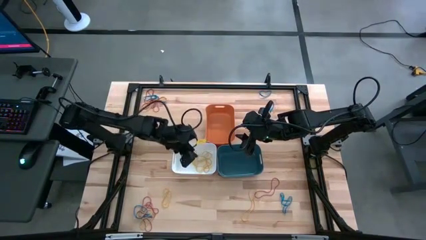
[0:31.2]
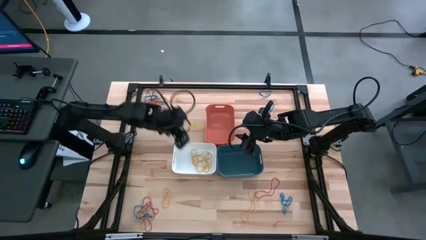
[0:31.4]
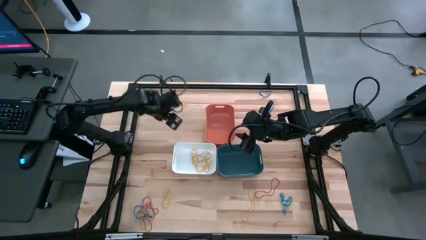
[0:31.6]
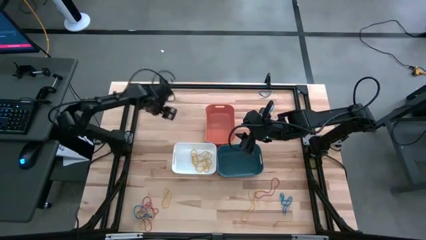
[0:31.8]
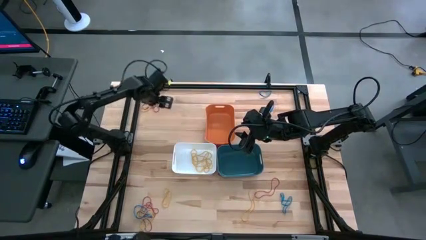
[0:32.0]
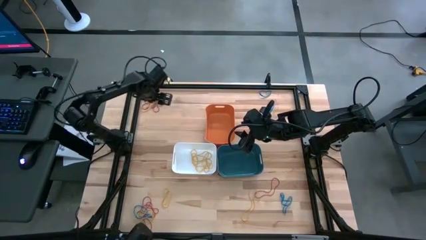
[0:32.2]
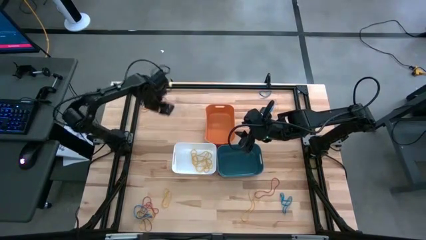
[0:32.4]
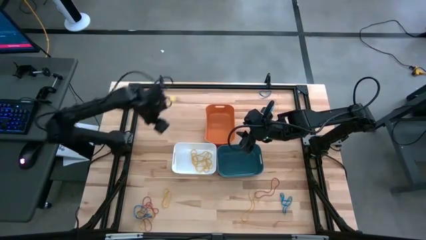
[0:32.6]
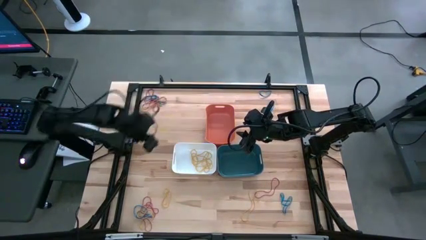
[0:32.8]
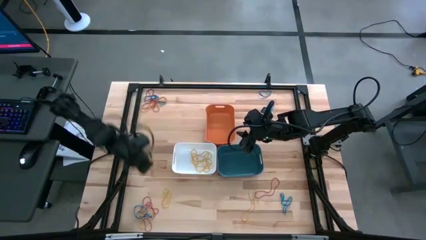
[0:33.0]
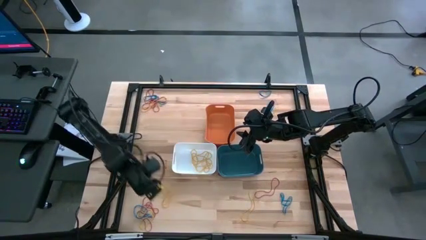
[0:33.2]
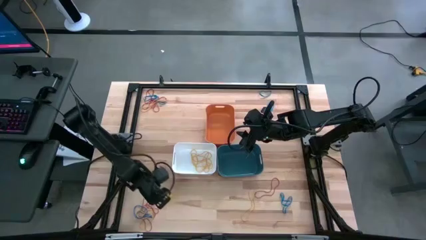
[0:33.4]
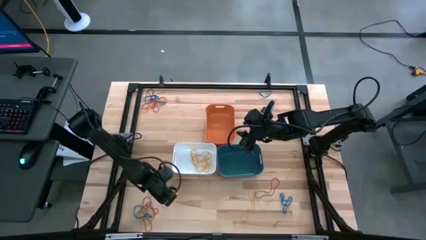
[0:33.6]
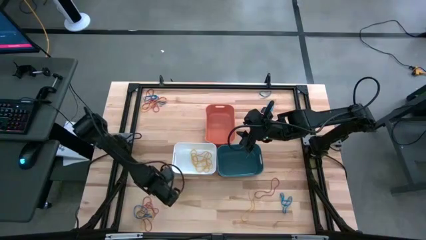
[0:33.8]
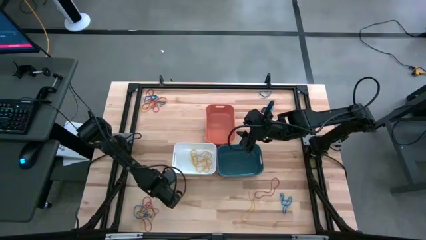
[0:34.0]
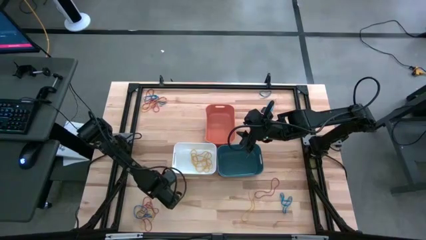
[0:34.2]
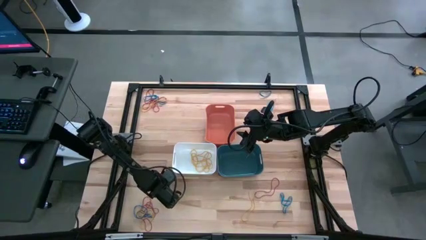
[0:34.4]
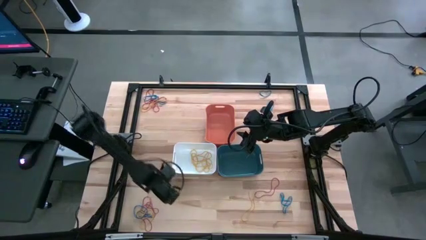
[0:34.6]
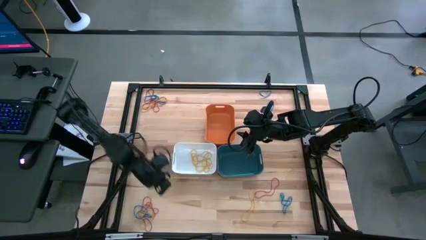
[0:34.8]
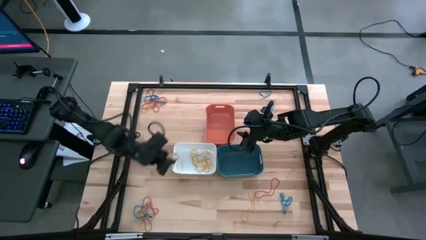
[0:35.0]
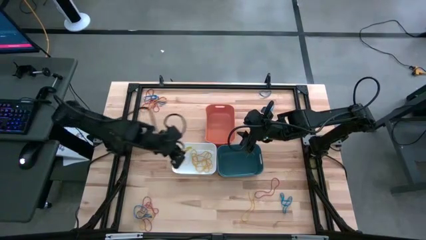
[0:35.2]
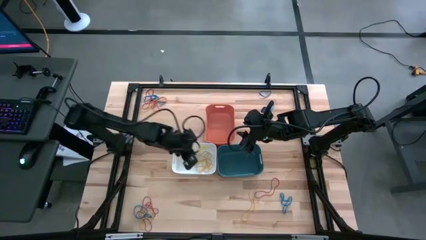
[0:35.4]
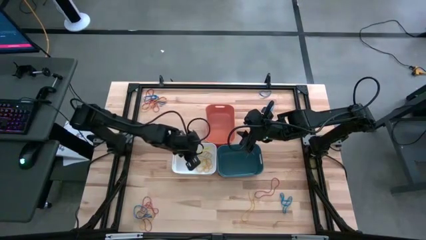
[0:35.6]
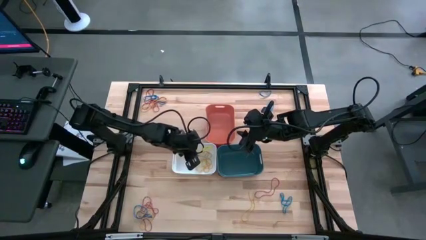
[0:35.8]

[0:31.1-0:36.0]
Task: Sort rubber bands into baskets
Put the yellow rubber band into the white bin

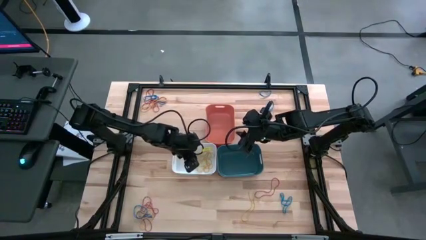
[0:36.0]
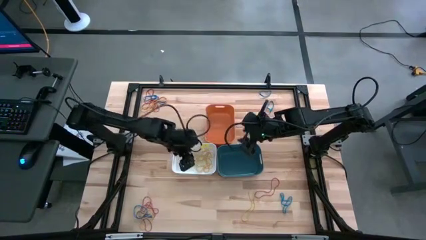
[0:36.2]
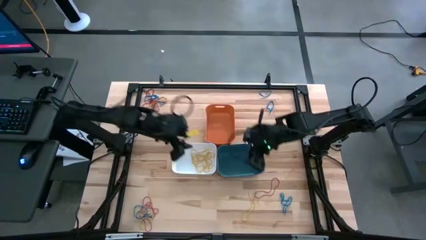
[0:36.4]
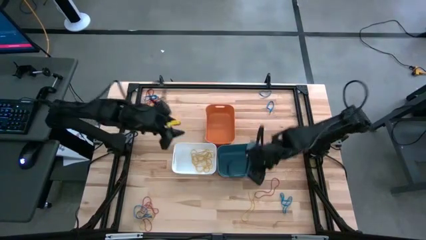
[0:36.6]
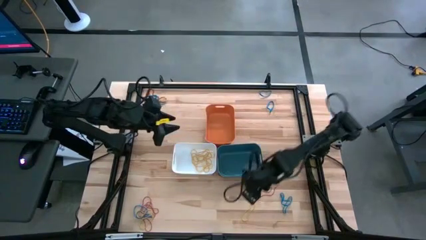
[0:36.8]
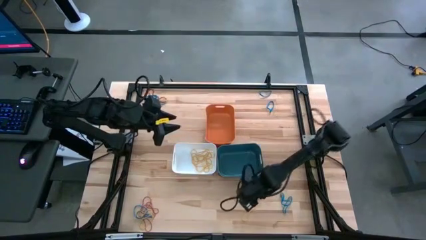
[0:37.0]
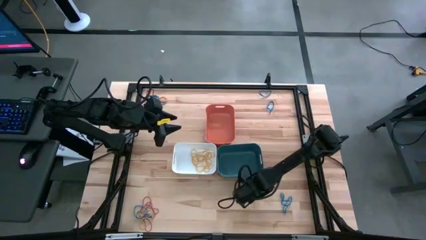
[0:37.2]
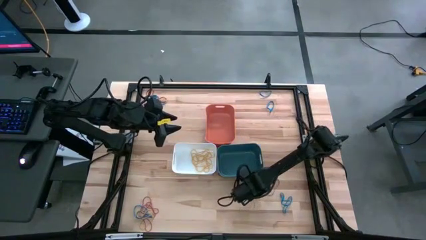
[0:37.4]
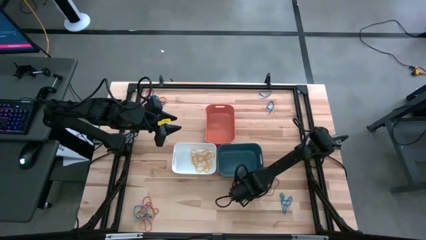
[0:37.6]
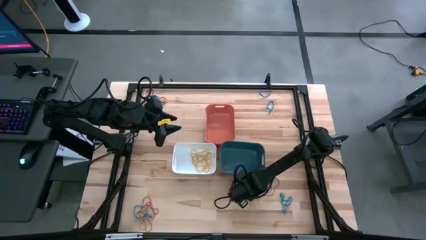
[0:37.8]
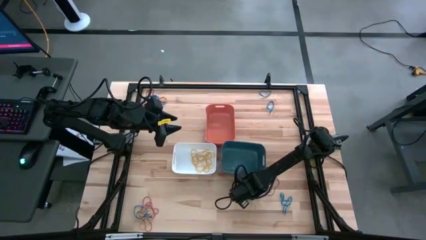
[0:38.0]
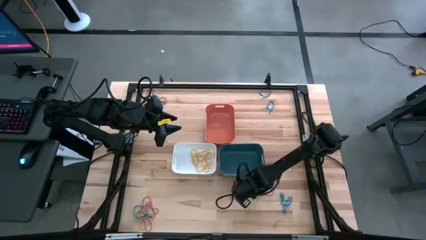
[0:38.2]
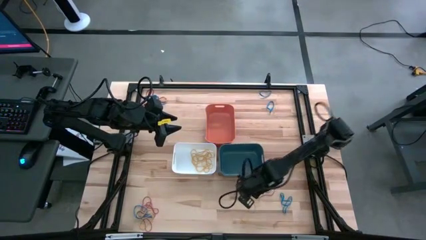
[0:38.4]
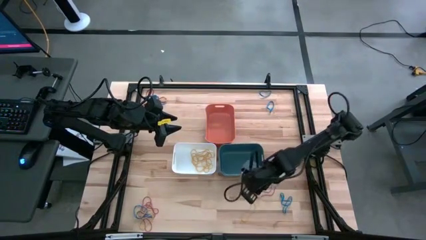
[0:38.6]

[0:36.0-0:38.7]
Put the yellow rubber band into the white bin

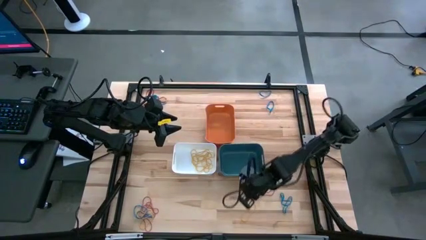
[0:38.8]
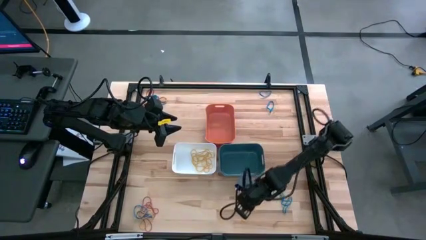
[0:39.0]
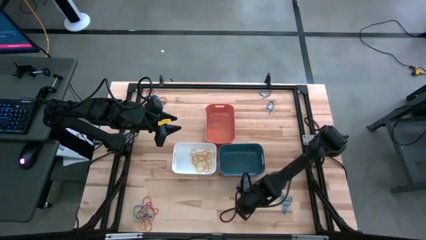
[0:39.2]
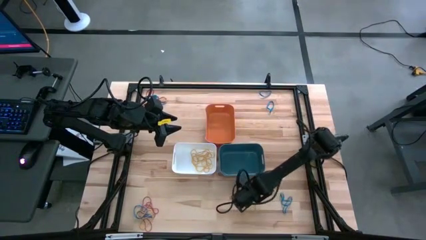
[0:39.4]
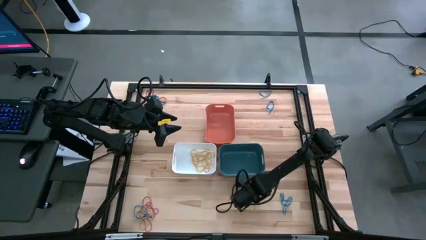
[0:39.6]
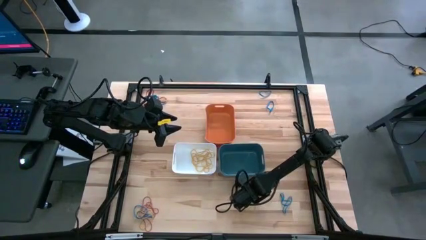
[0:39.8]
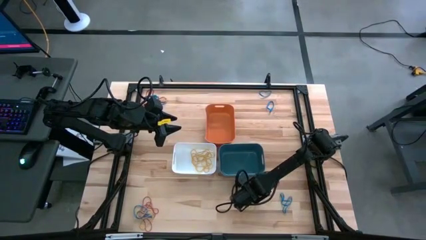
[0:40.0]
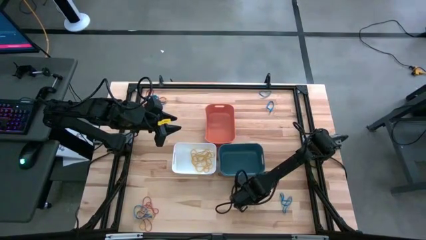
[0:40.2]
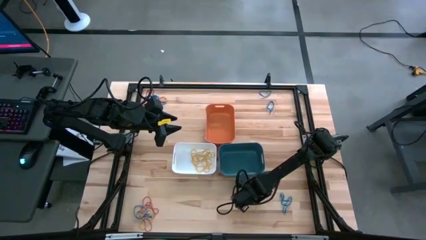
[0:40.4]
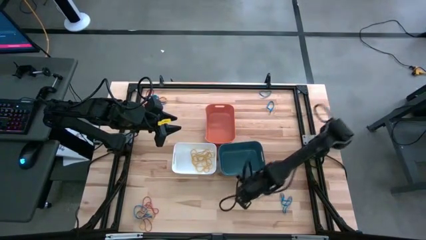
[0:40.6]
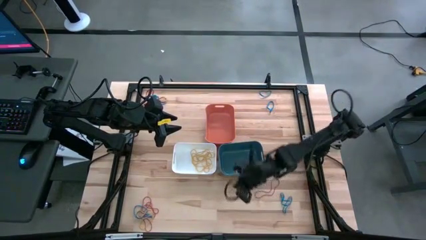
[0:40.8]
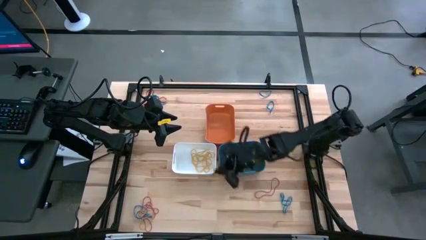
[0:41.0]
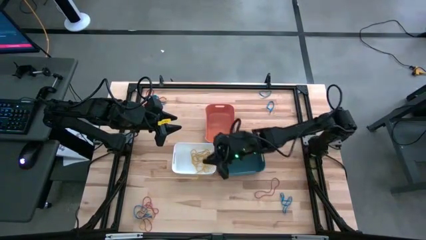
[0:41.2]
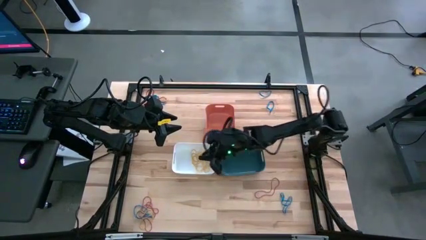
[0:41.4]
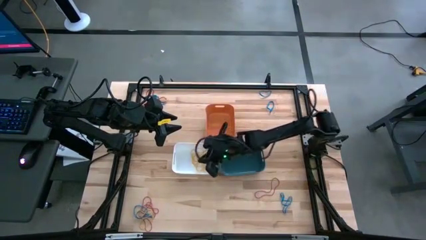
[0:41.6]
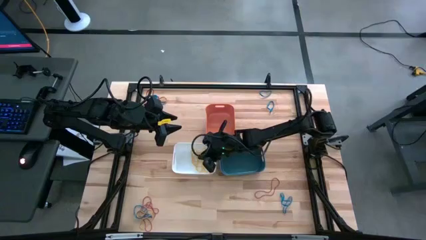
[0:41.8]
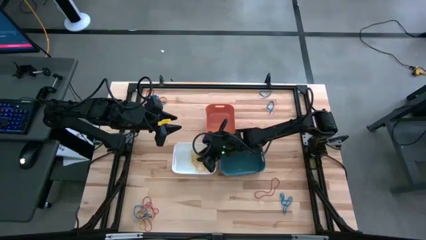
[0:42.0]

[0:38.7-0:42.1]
Put the yellow rubber band into the white bin

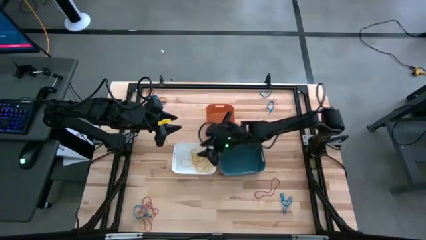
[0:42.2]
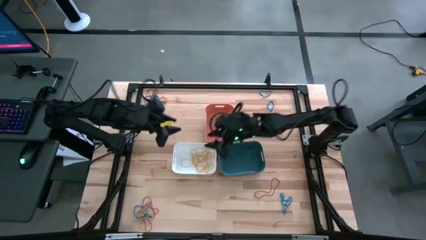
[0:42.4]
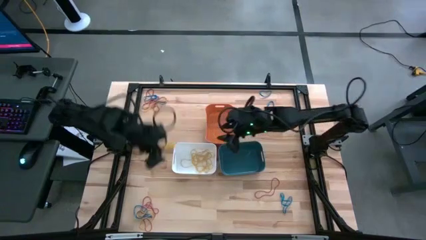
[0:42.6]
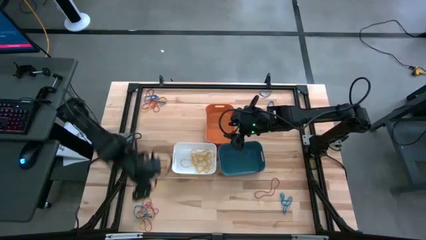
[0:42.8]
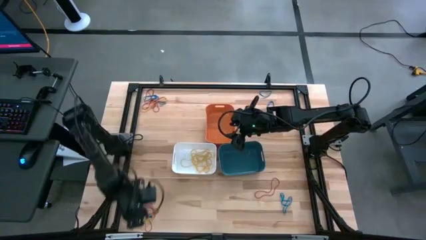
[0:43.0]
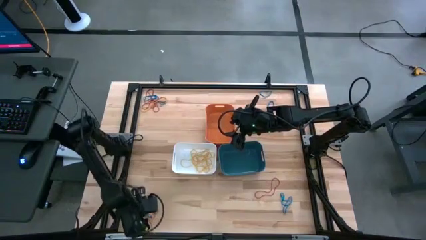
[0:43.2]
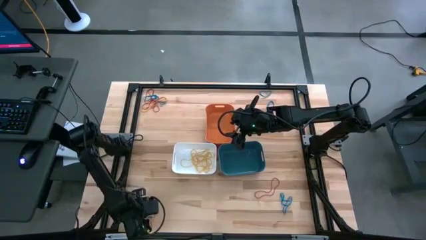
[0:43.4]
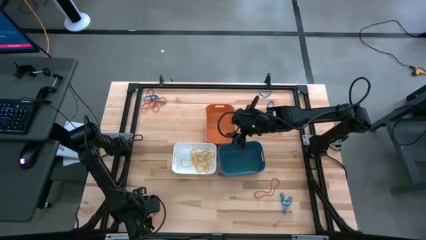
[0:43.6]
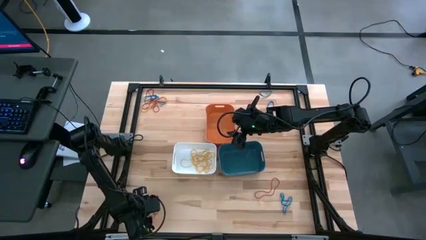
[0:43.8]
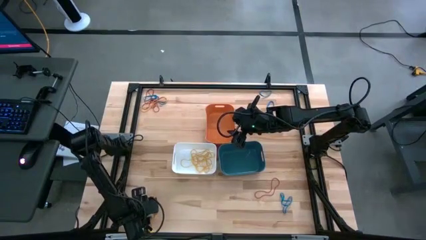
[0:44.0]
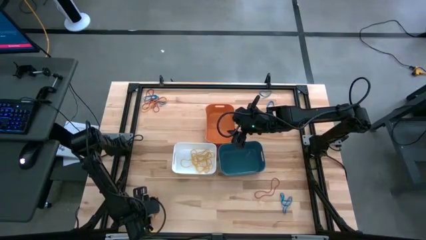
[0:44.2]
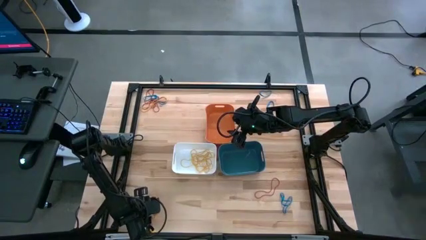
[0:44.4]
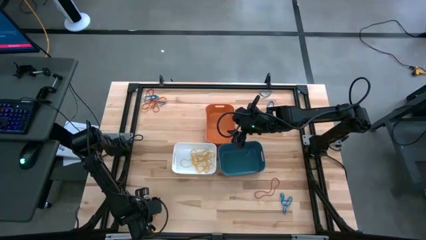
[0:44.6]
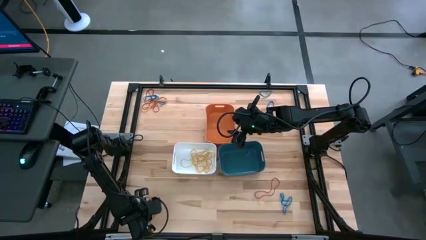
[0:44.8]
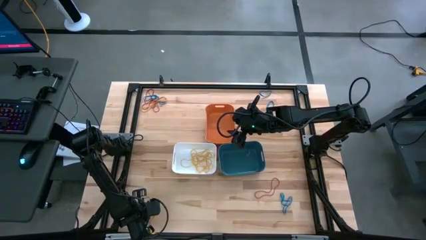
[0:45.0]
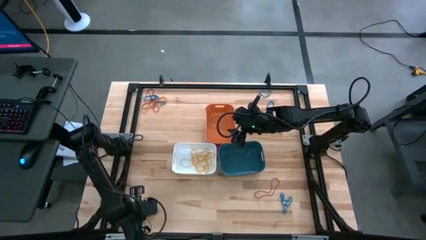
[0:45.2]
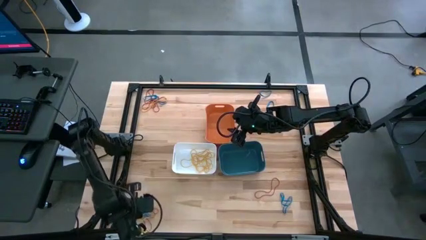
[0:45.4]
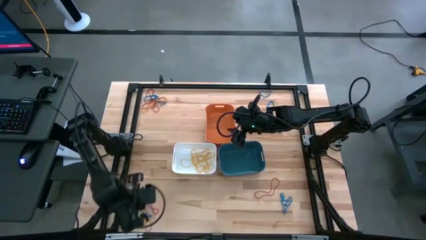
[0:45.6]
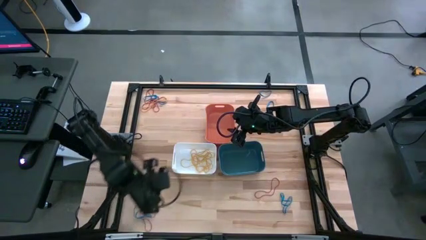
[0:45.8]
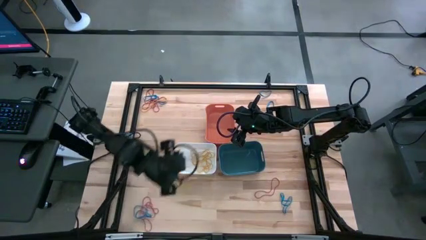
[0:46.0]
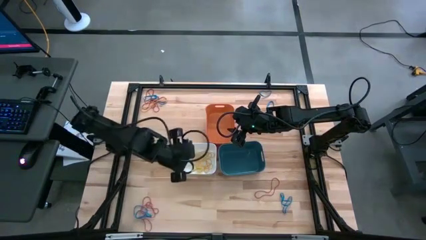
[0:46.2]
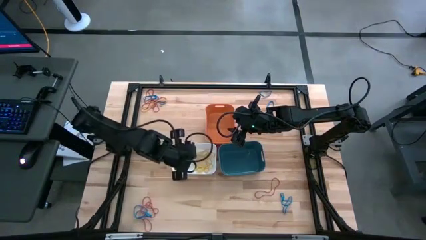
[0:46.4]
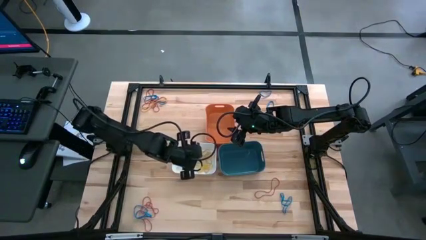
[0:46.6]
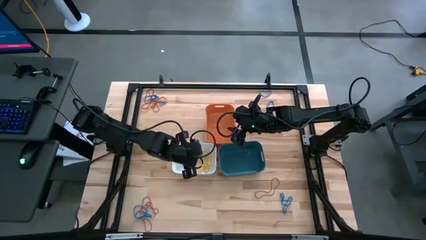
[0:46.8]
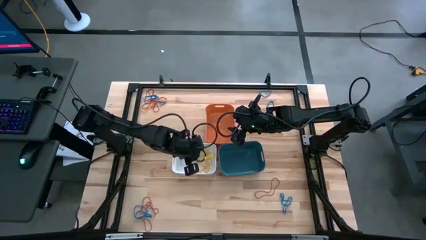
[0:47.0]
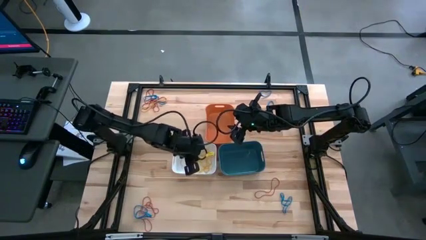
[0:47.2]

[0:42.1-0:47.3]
Put the yellow rubber band into the white bin
